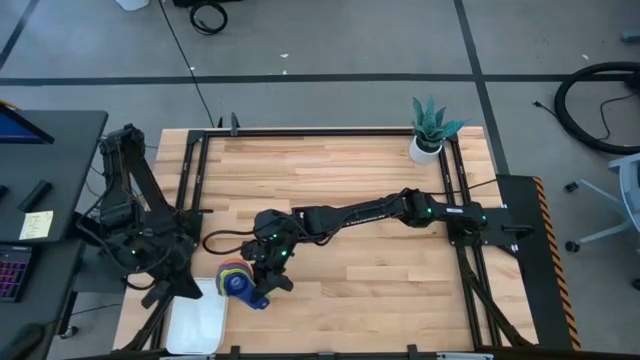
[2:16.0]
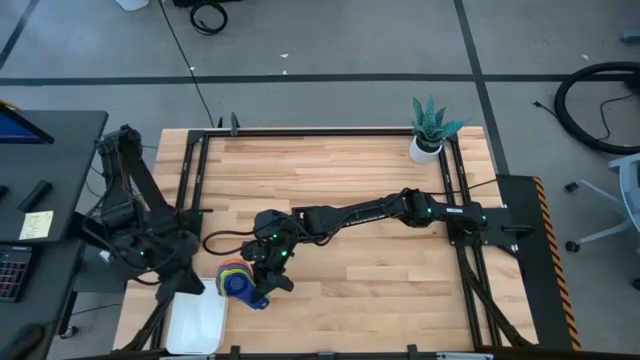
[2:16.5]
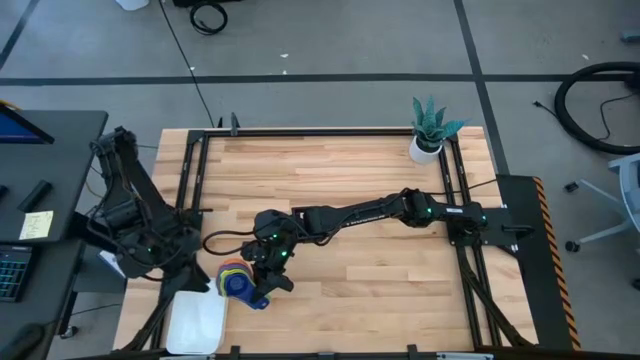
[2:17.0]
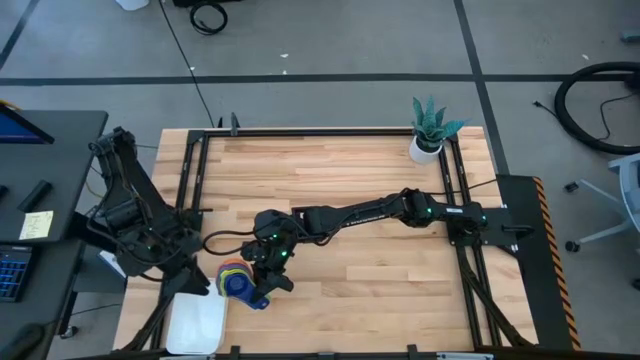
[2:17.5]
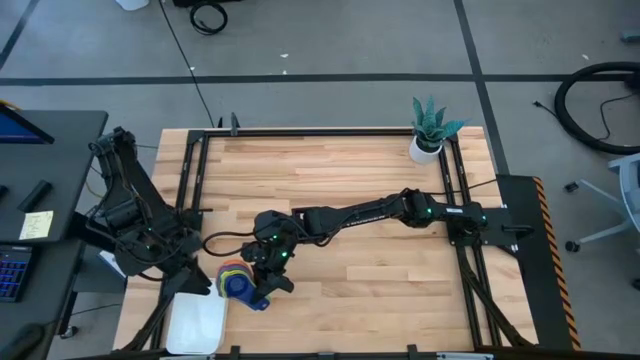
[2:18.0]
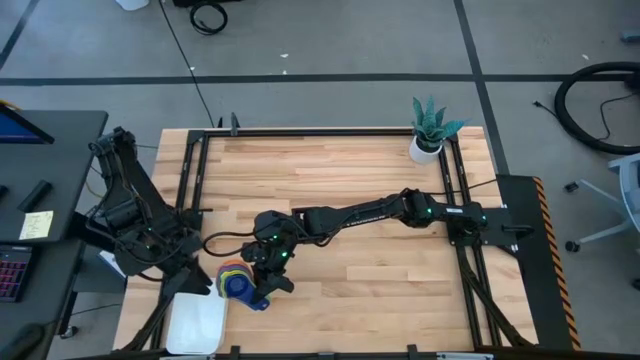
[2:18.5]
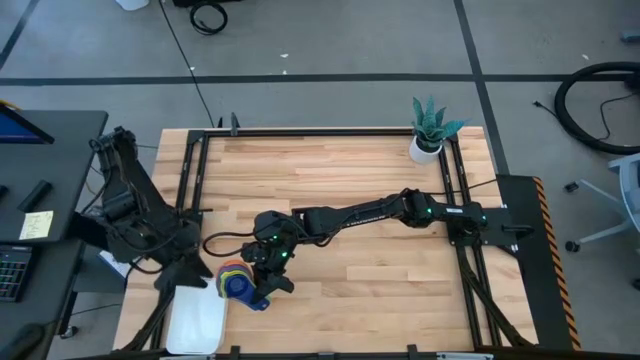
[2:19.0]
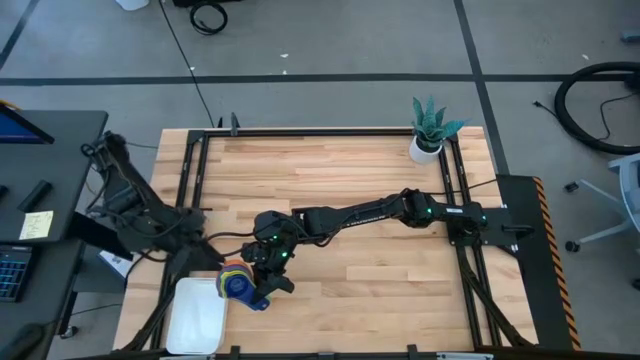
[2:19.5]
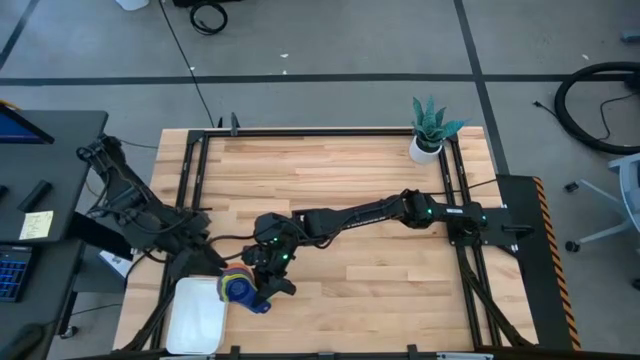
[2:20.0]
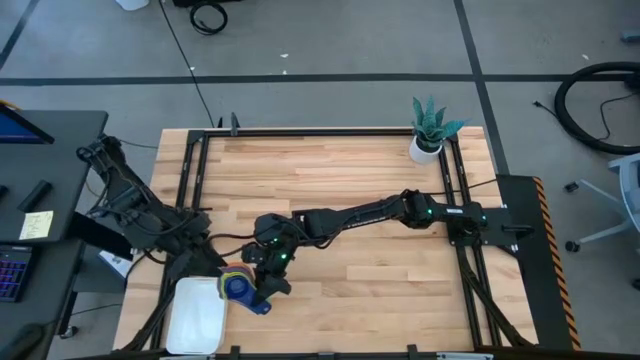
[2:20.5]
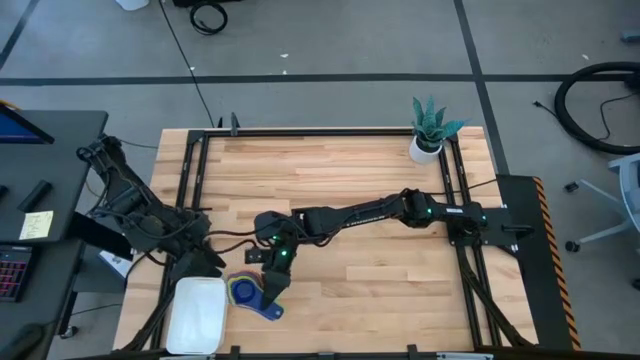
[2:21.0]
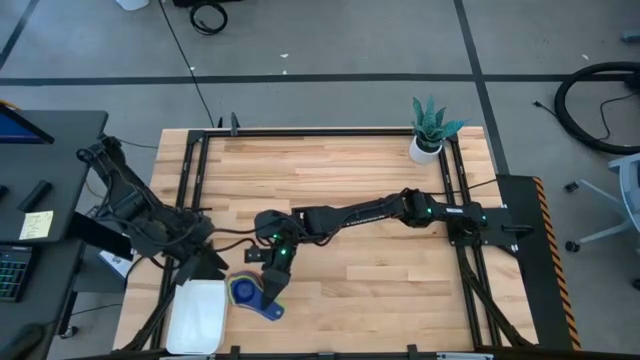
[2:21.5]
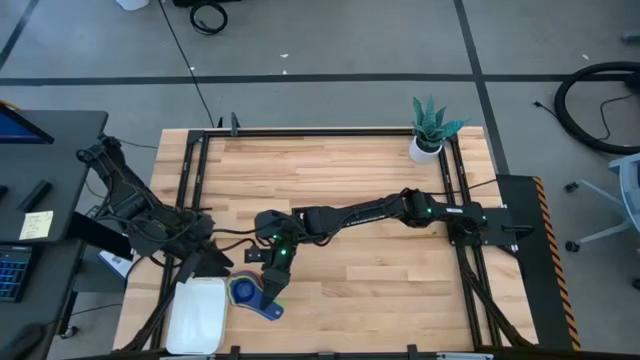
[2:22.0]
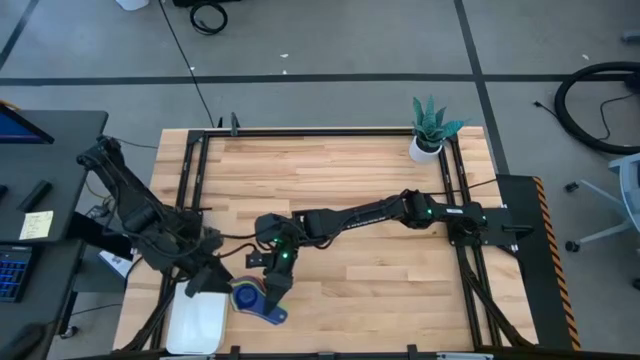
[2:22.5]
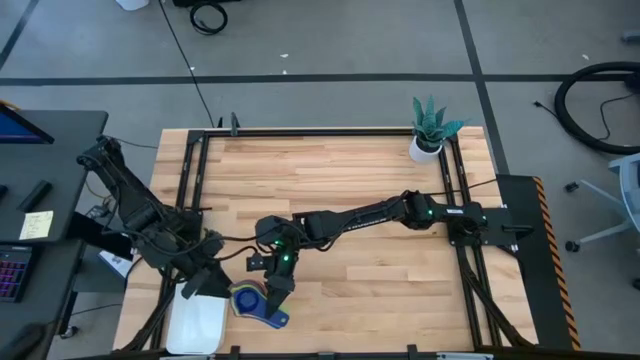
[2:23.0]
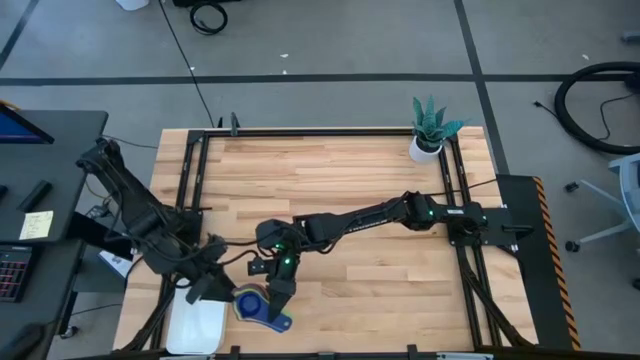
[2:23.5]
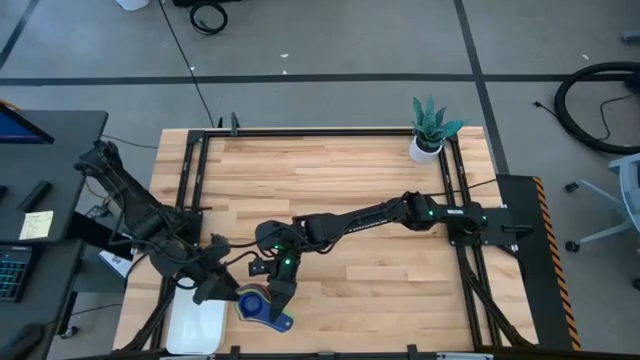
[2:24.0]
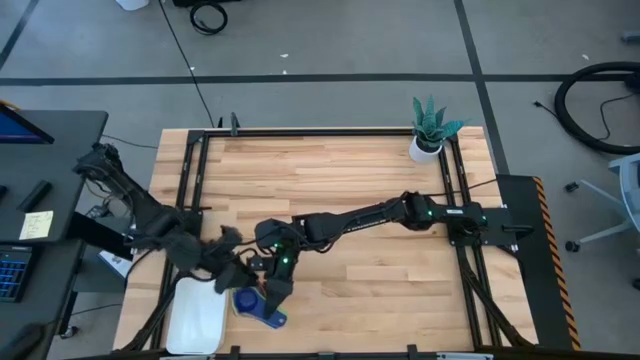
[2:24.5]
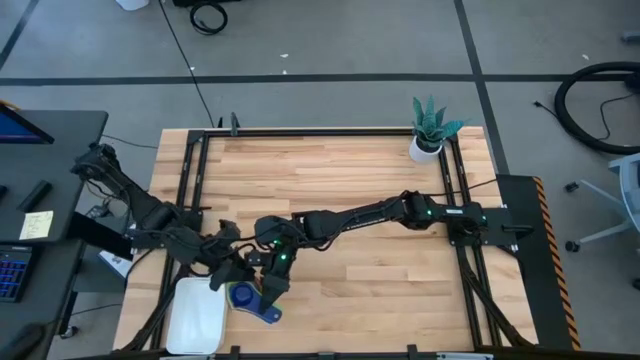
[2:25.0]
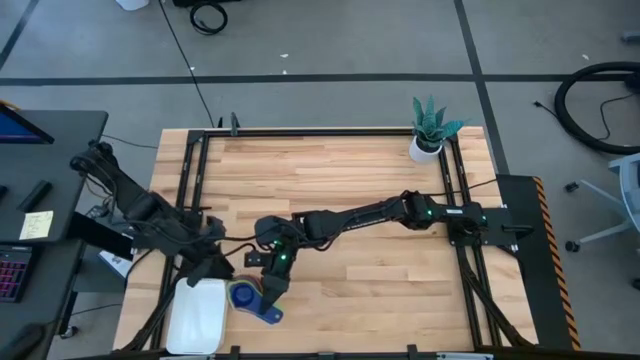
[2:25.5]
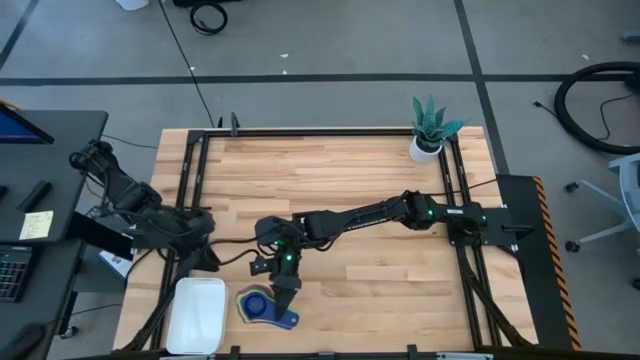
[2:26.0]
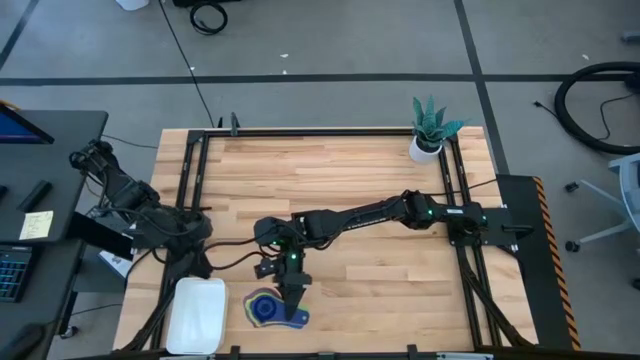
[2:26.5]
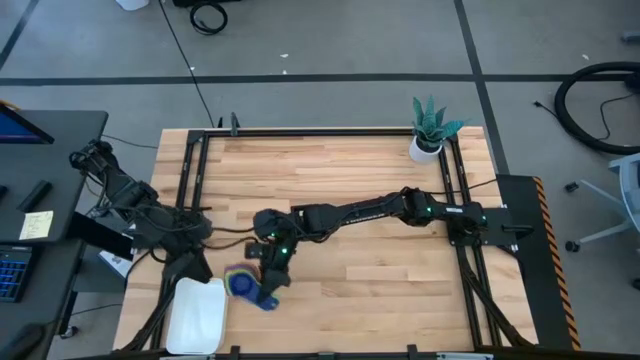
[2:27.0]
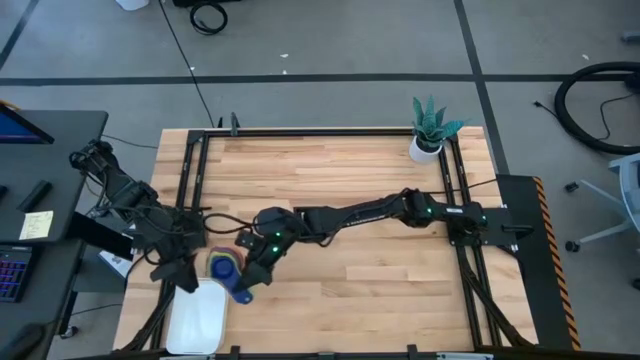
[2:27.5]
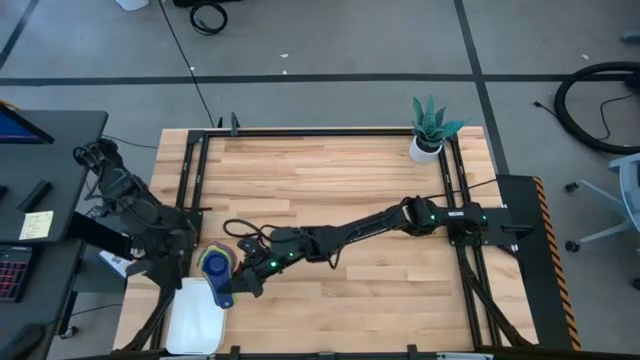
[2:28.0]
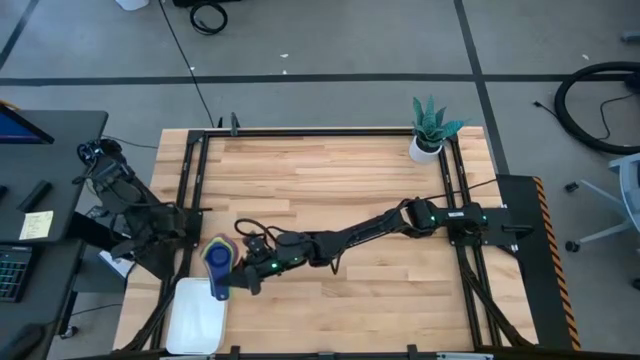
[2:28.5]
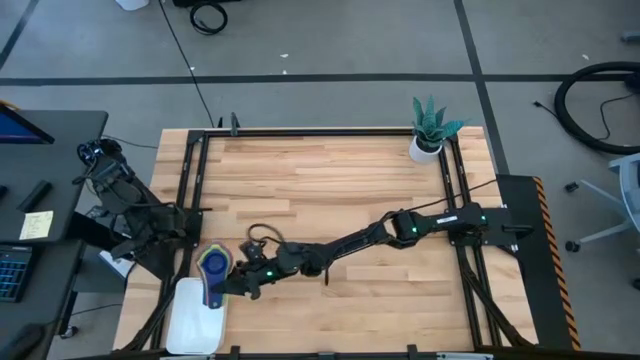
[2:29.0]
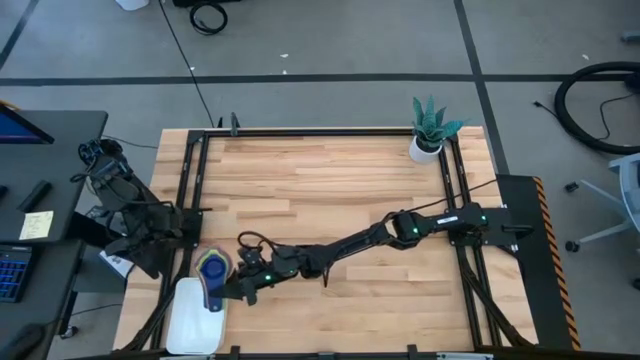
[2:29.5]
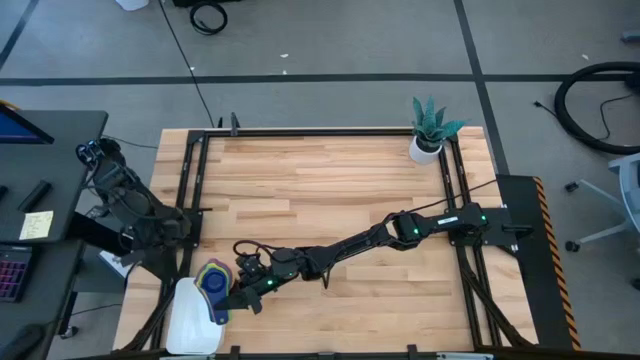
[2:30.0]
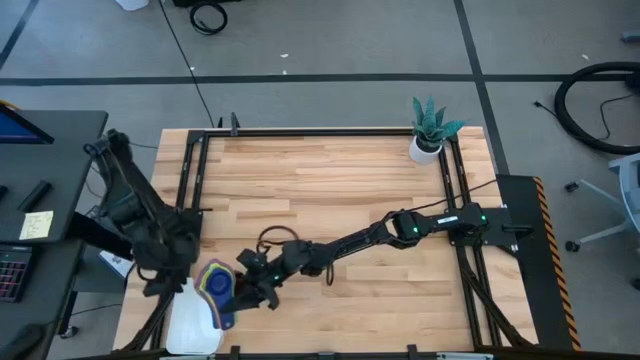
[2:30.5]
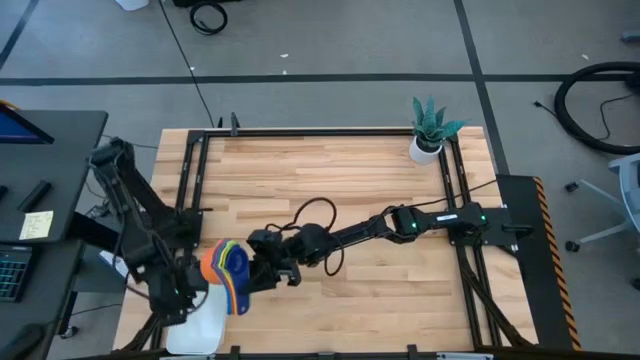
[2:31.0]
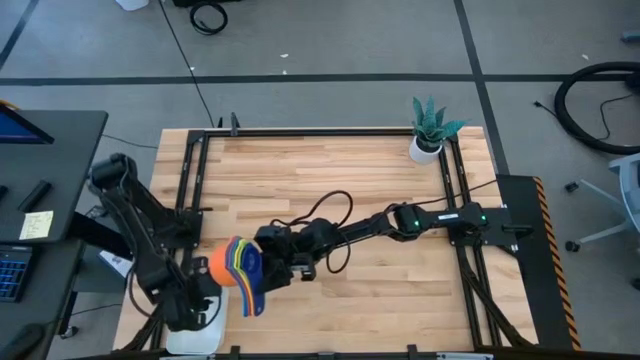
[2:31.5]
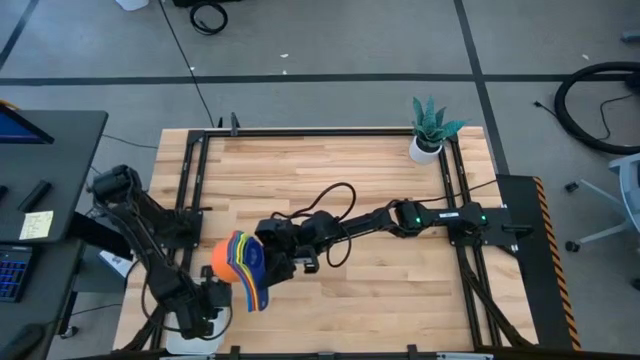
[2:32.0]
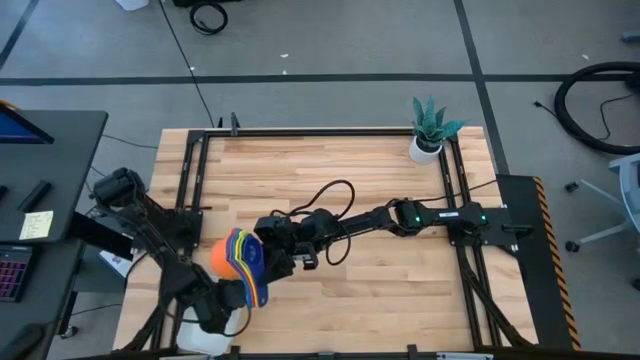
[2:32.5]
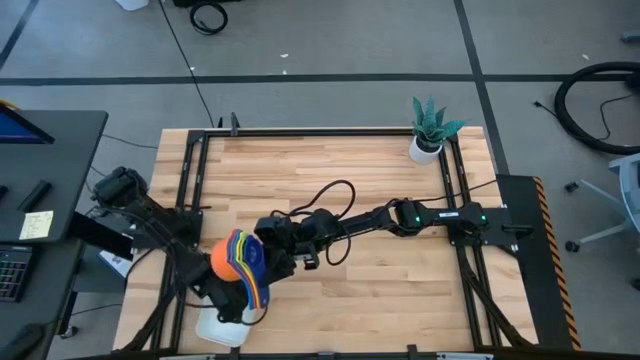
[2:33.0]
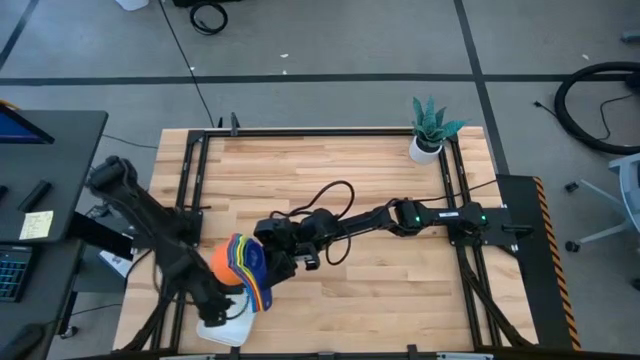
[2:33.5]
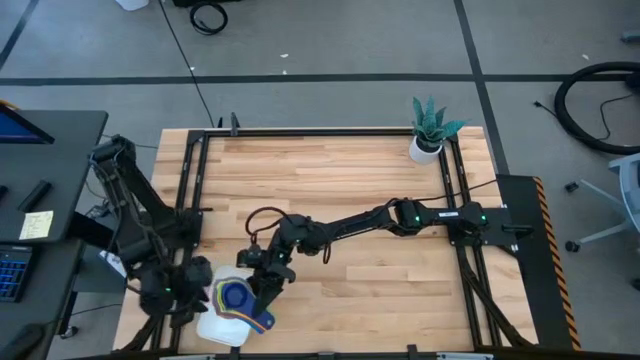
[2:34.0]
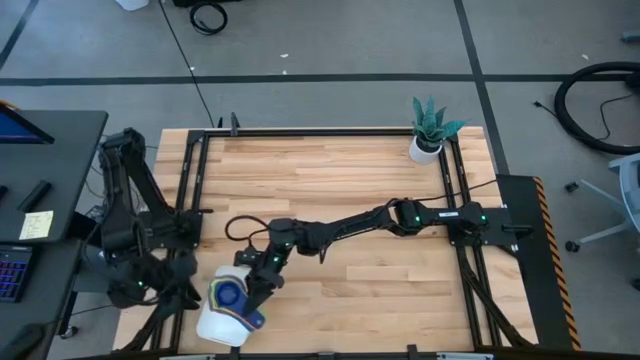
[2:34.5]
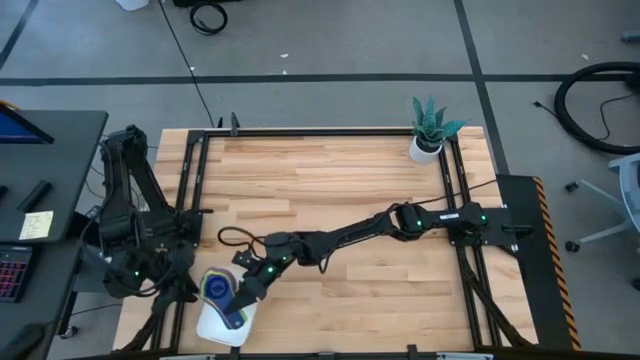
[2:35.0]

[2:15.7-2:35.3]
Task: Nest measuring cups in basket
Put the nested measuring cups into the white bin

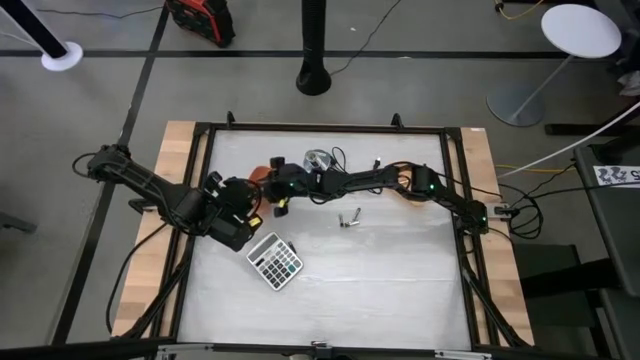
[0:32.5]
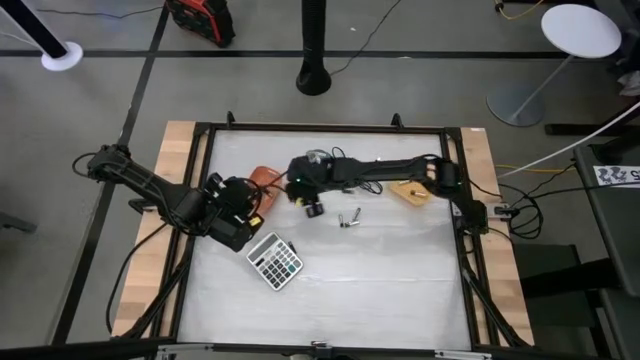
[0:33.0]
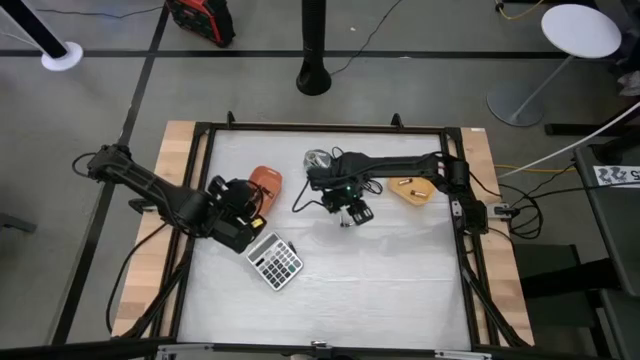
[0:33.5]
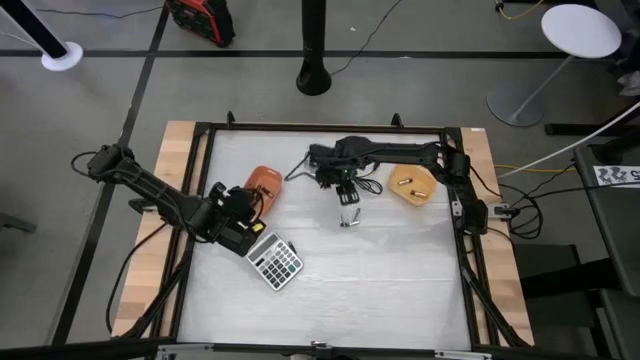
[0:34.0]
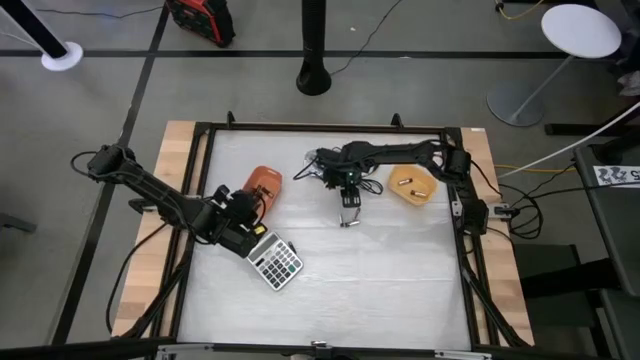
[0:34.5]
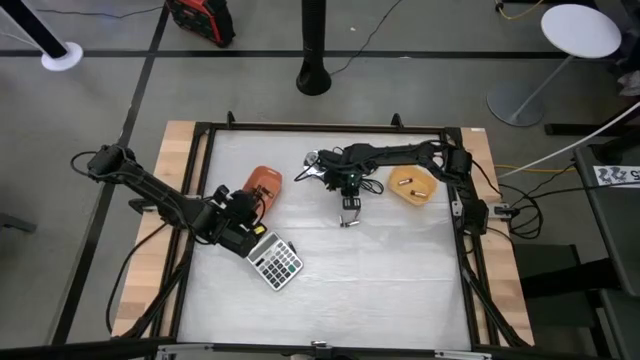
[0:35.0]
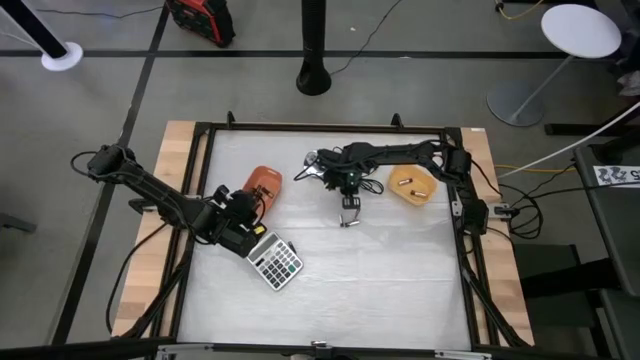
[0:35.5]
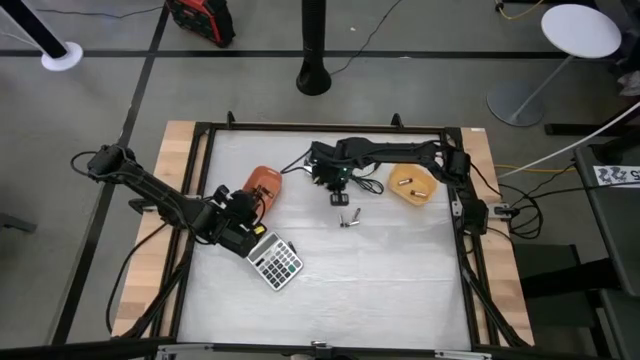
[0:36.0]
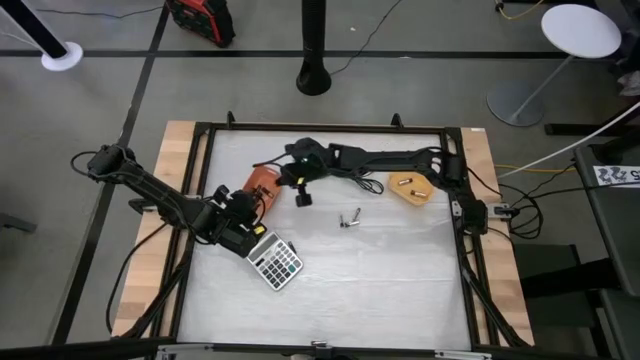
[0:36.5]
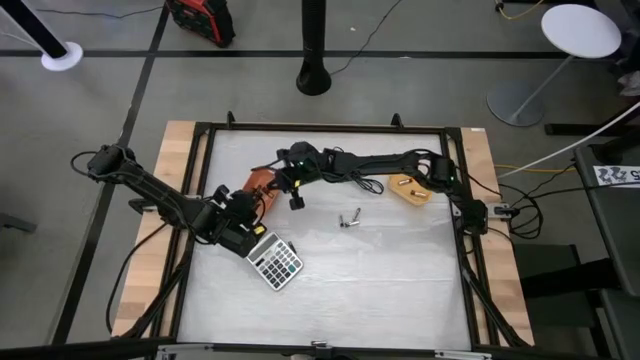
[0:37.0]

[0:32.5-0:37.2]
Task: Sort batteries
Put the black battery into the orange bin
